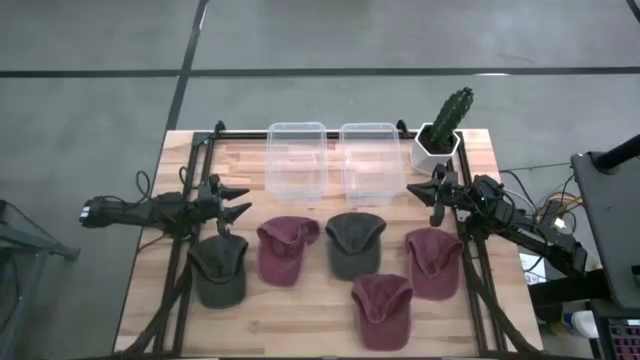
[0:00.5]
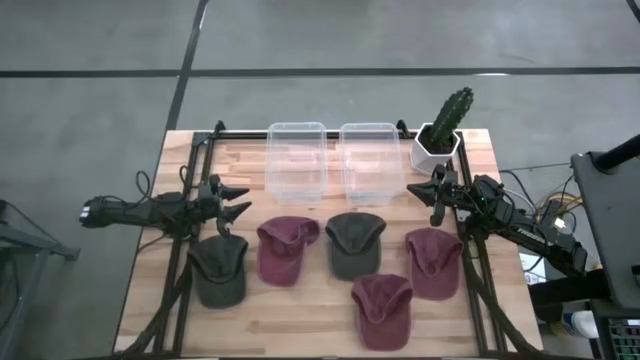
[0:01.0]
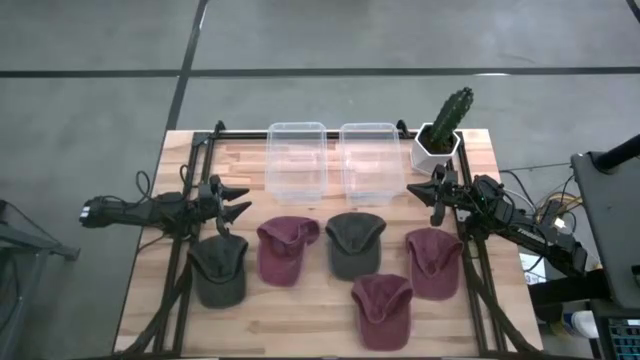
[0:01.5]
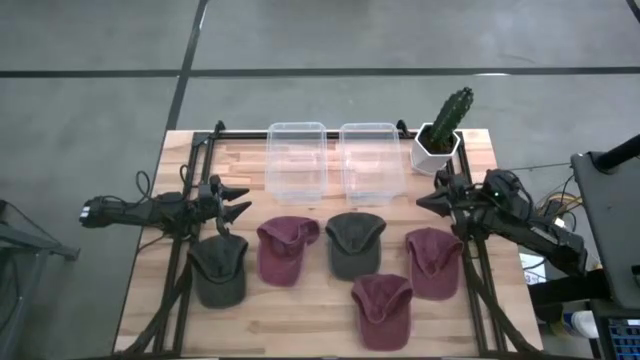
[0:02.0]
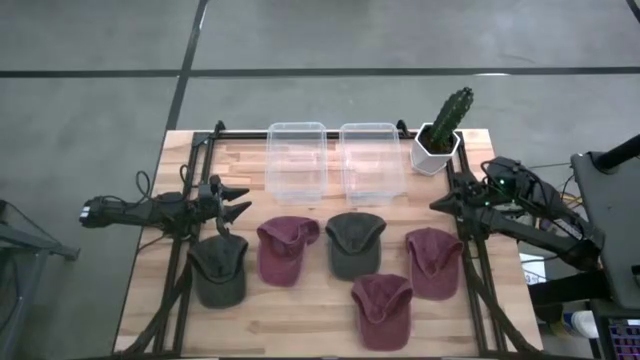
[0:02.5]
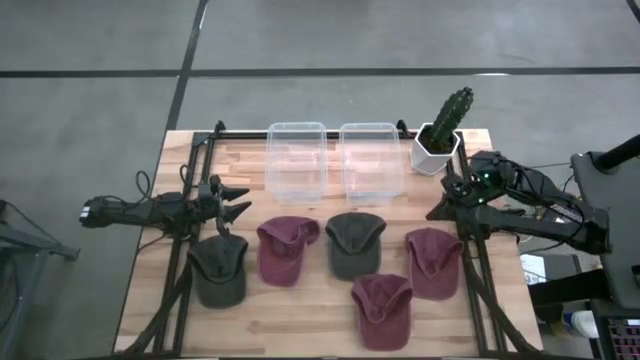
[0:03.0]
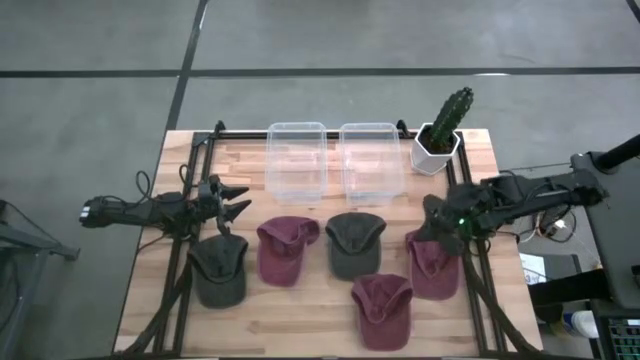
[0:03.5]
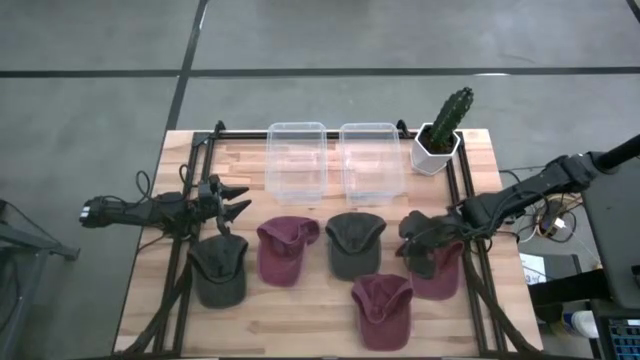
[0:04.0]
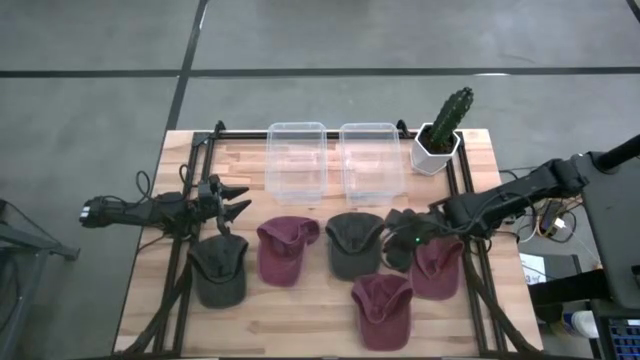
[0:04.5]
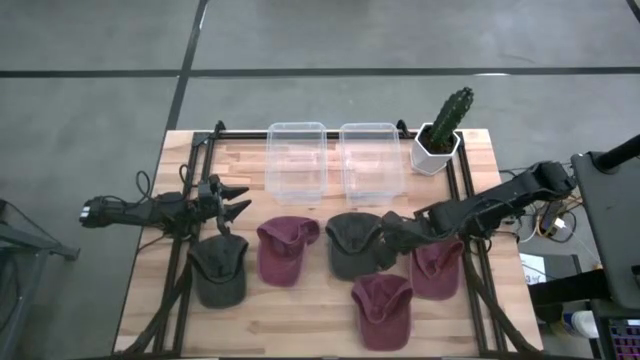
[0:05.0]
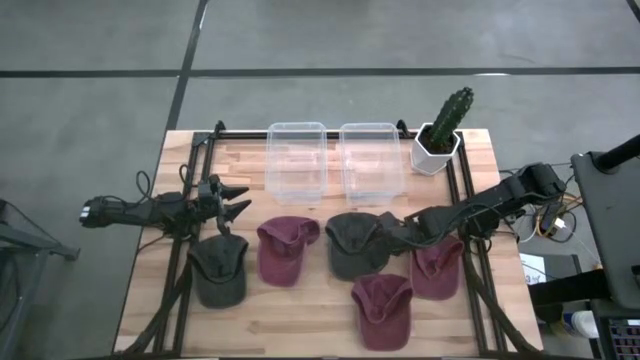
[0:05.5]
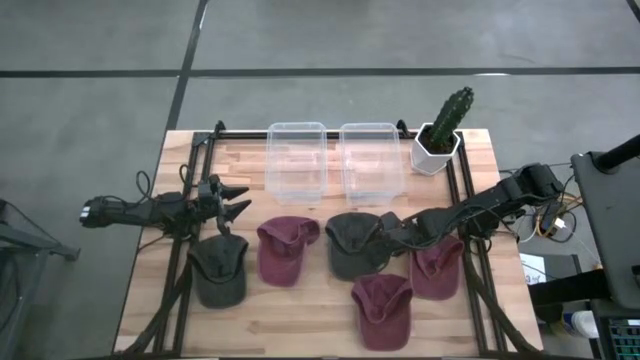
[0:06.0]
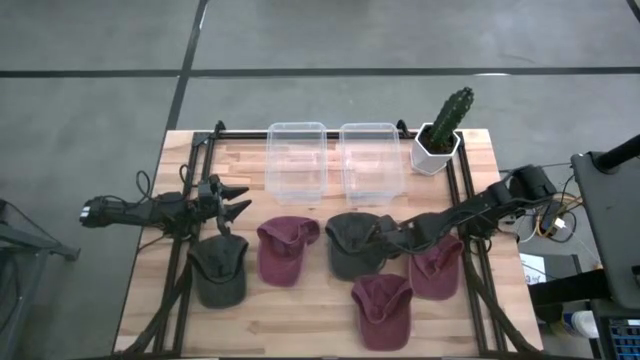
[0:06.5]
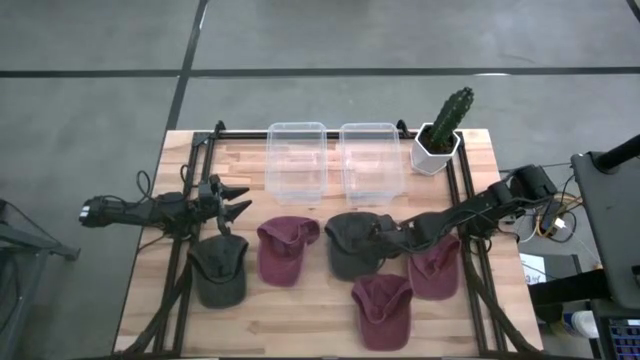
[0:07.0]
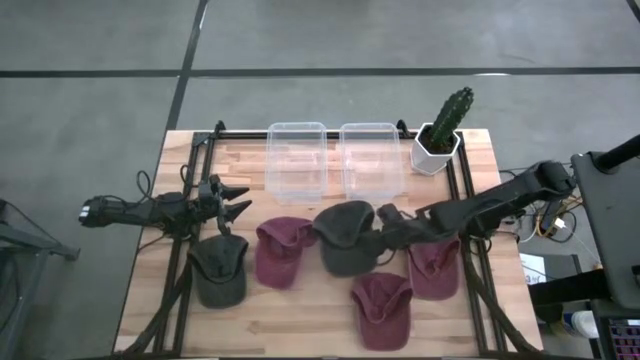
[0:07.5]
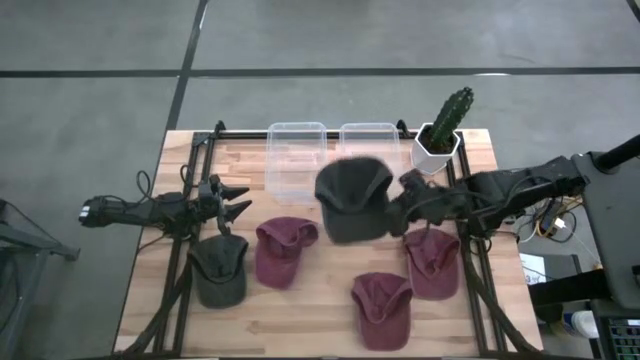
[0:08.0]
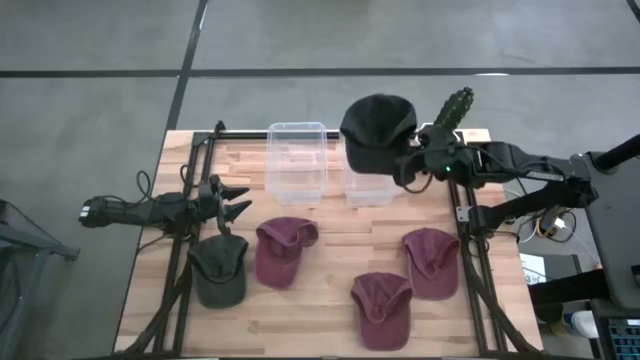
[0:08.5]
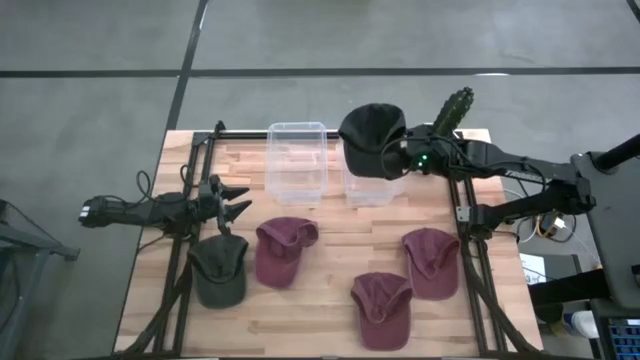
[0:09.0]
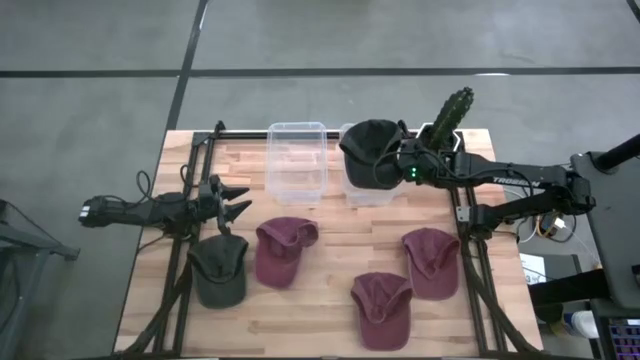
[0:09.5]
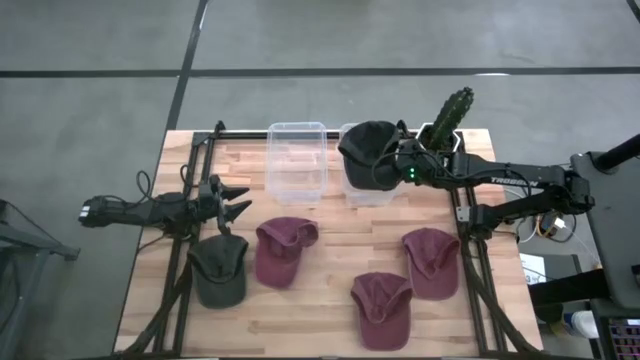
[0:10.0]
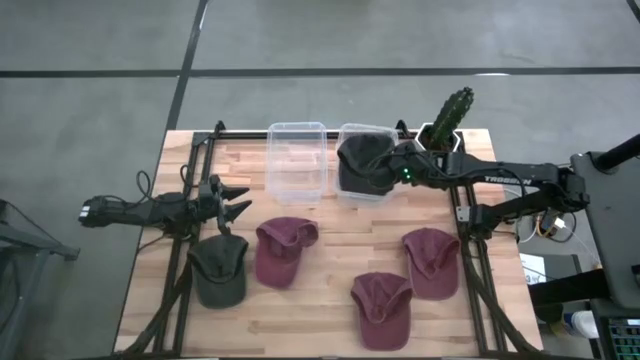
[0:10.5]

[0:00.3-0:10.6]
Task: Pick & Place hat
Put the right black cap into the right transparent bin

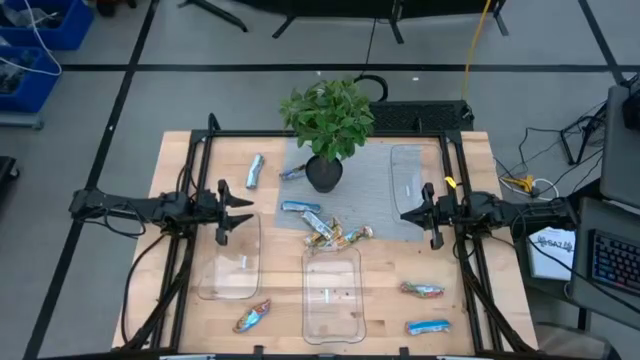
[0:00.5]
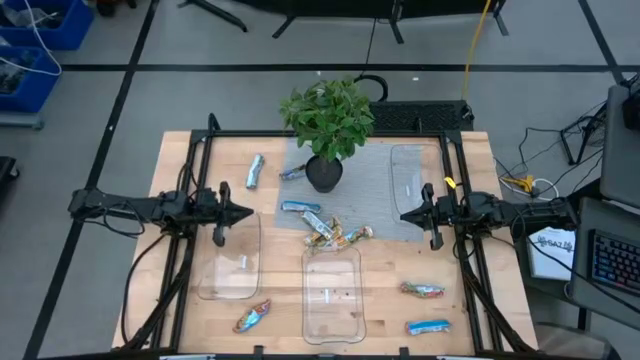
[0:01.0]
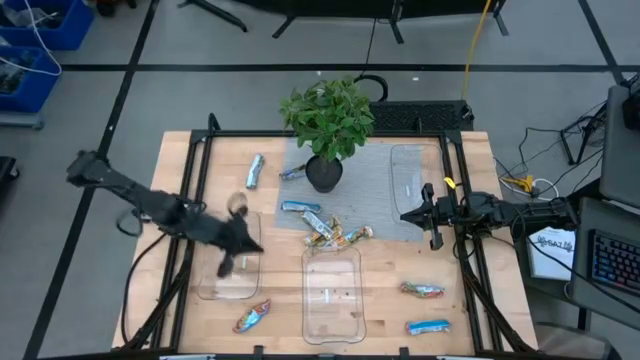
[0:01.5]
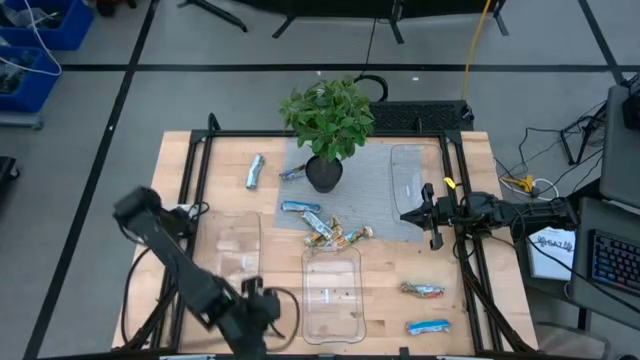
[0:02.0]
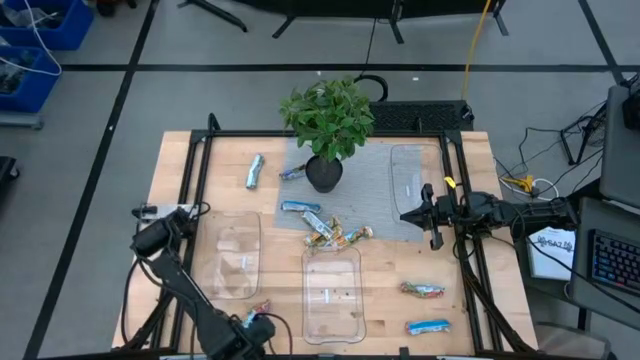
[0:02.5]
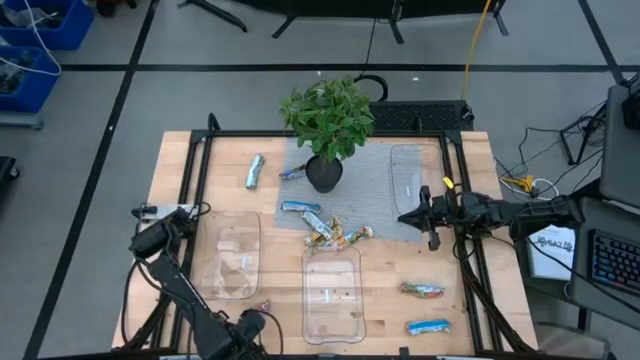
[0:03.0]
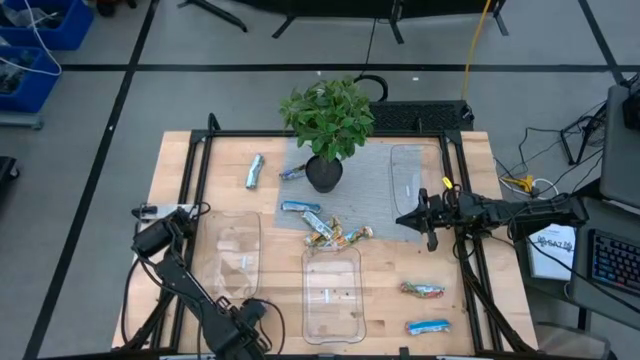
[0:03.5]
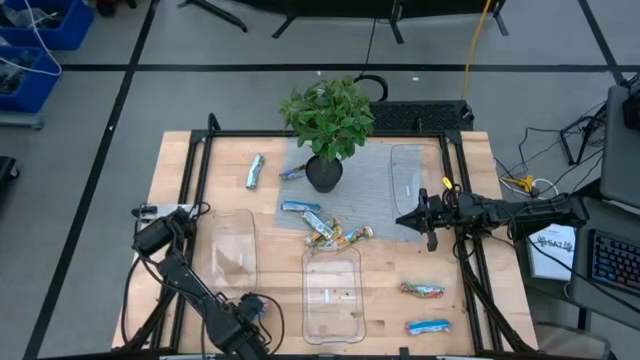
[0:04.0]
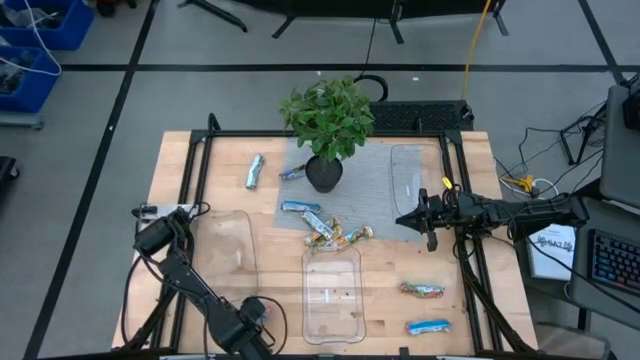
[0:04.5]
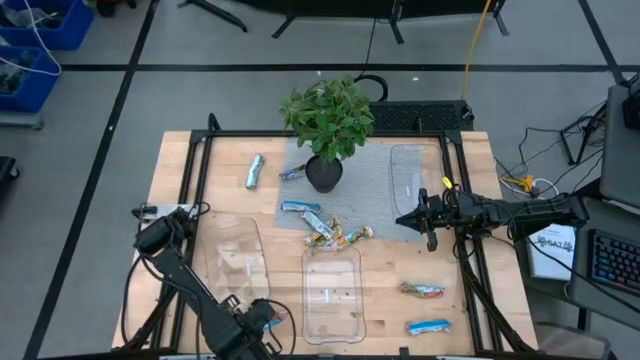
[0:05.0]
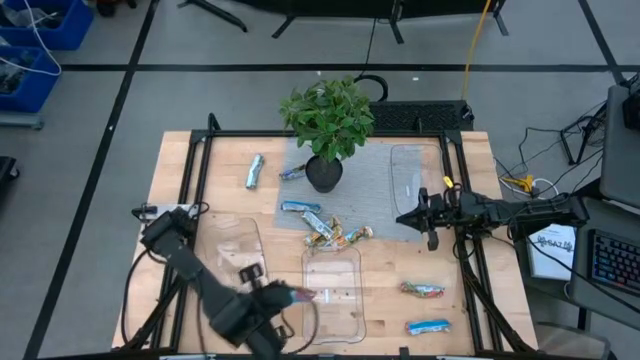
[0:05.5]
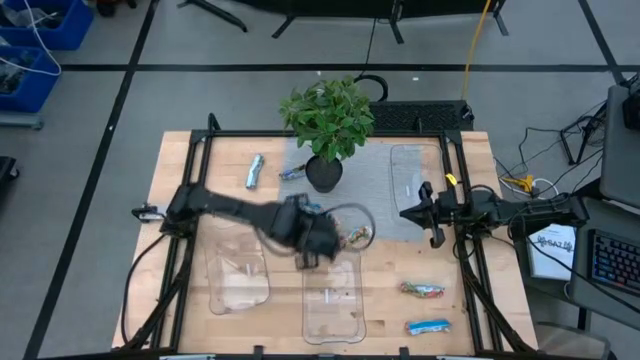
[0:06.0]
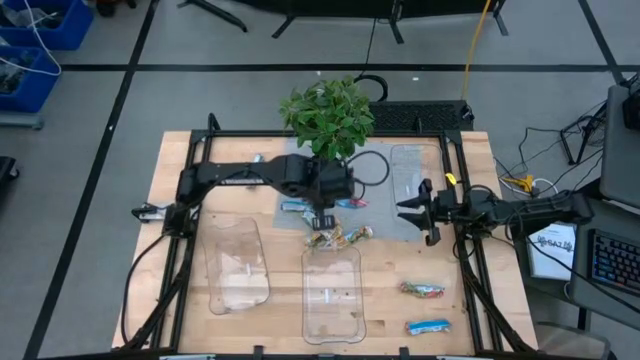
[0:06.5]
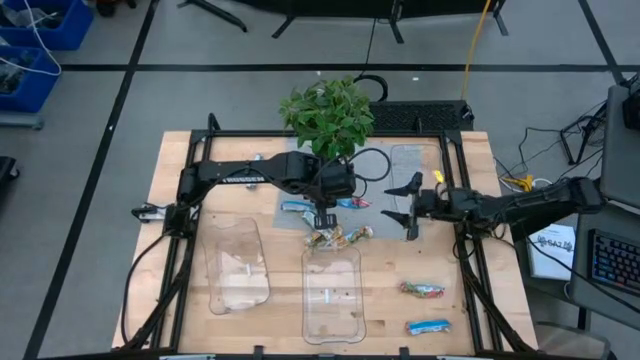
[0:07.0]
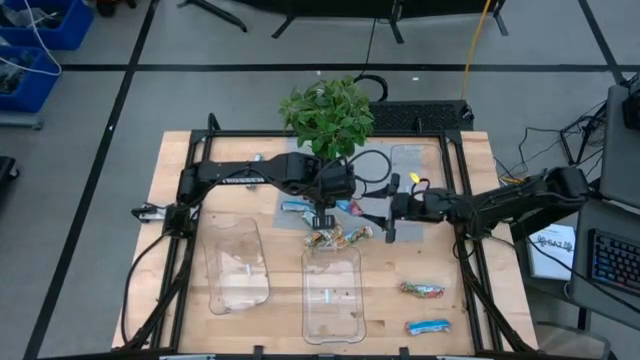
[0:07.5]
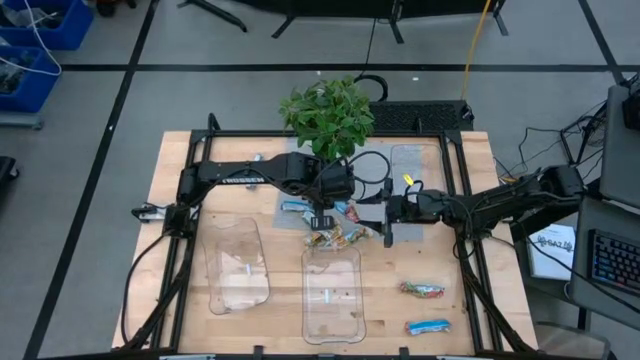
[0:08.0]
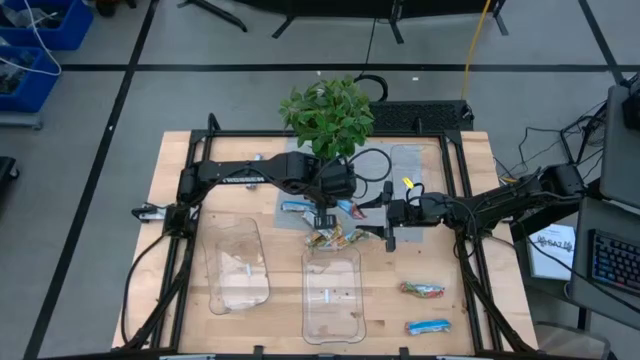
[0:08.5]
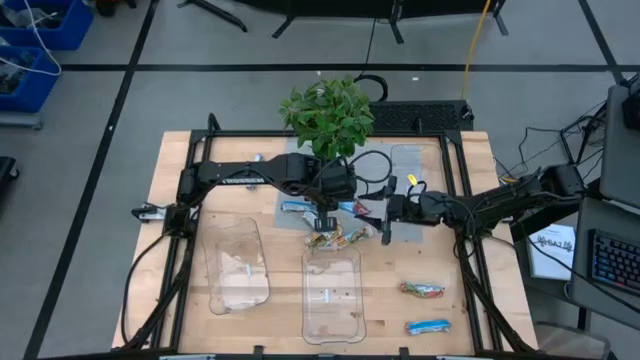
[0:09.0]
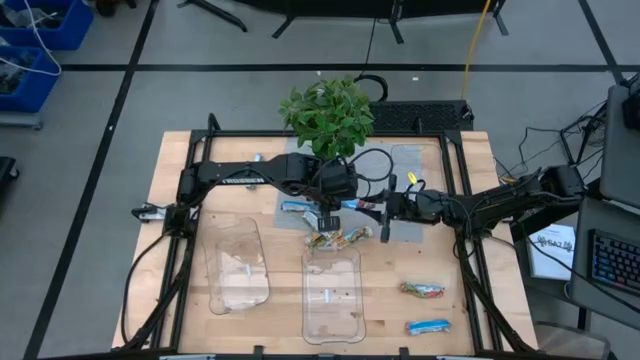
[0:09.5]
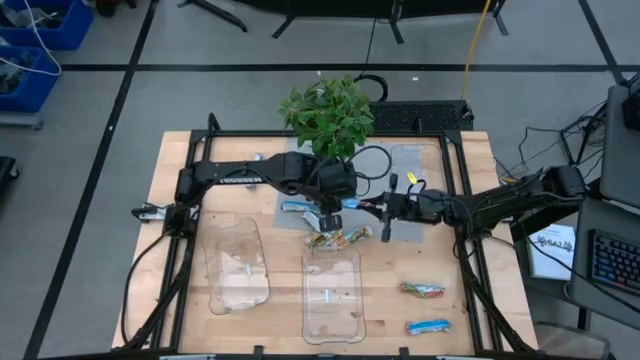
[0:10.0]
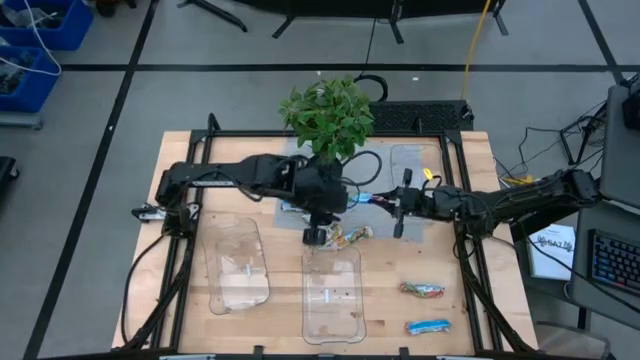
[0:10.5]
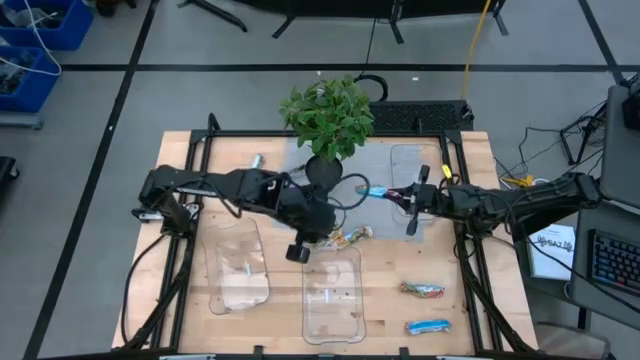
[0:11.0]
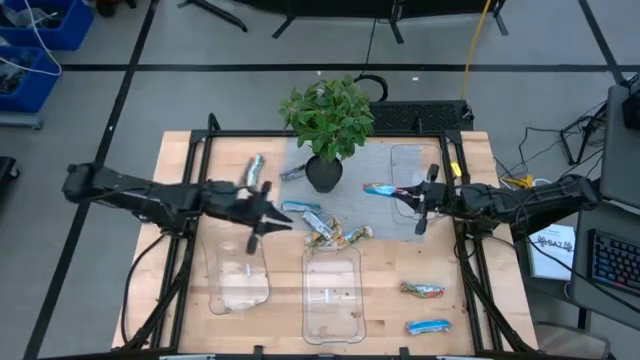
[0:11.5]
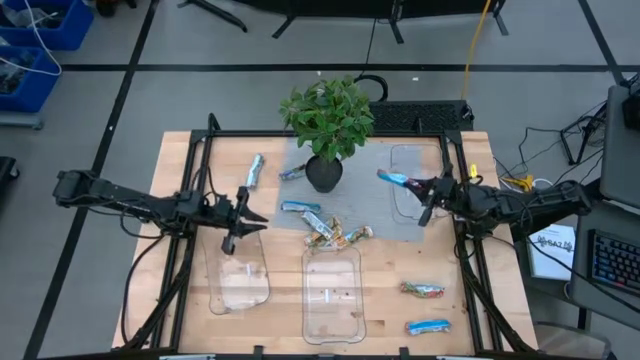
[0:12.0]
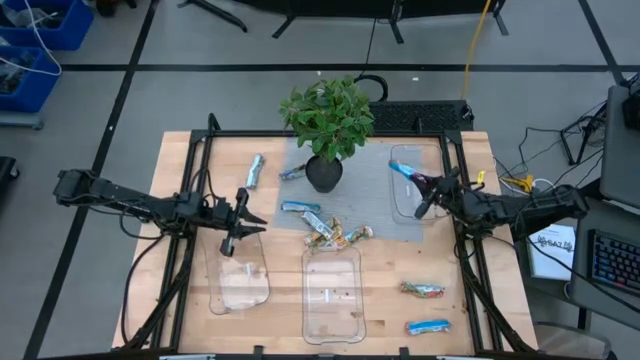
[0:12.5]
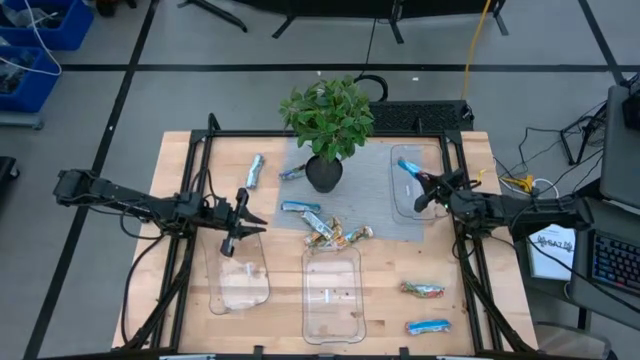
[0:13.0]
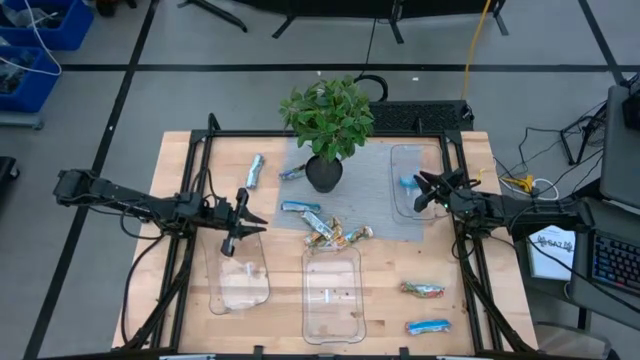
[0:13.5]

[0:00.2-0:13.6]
Task: Pick and place Granola Bars by type
Put the left red granola bar into the right transparent bin
